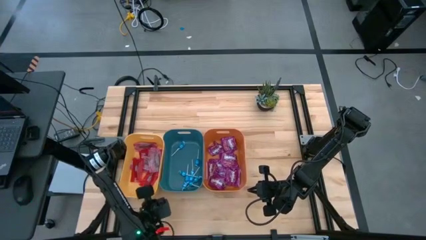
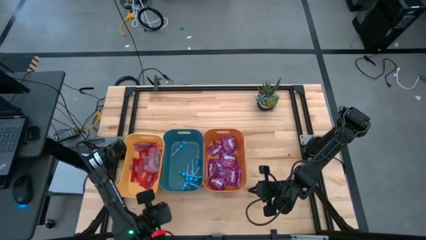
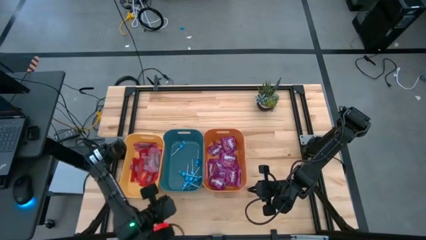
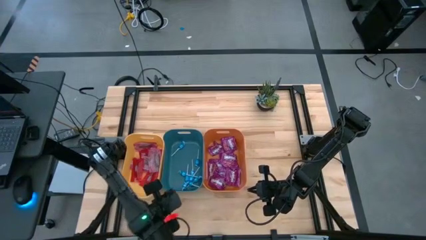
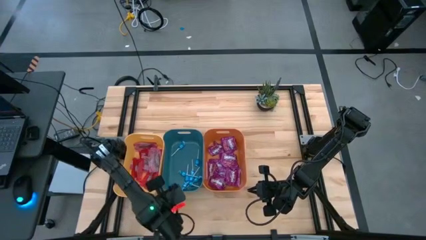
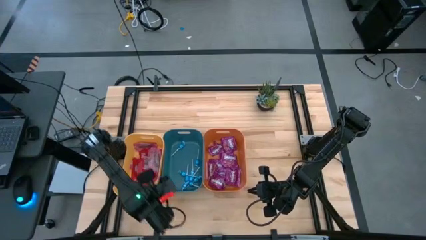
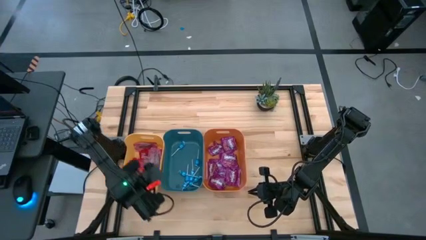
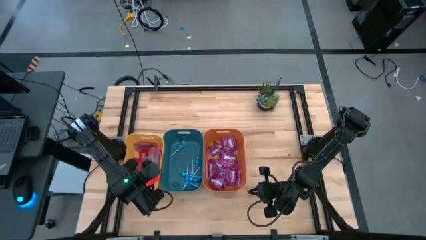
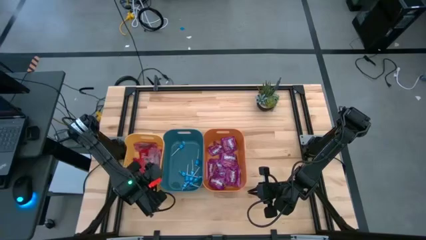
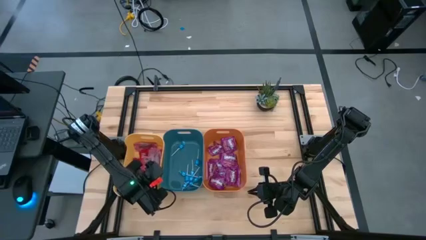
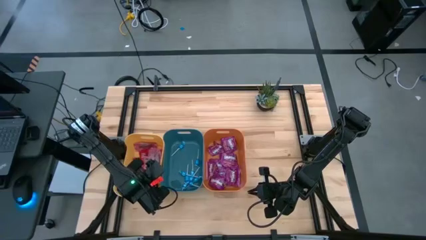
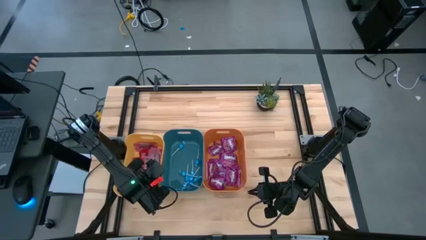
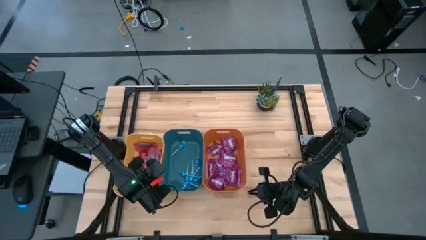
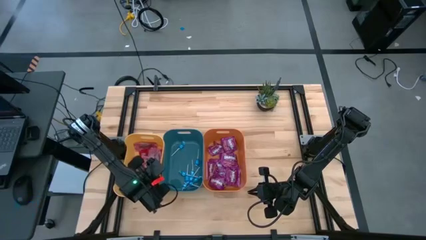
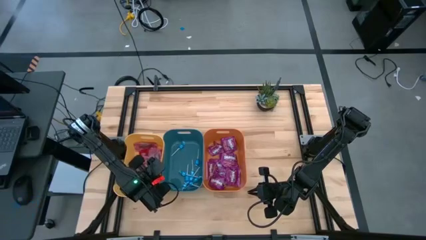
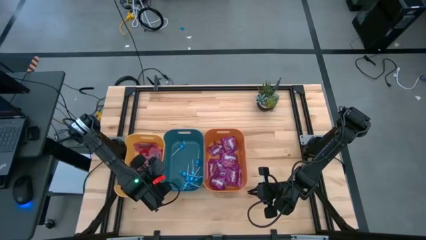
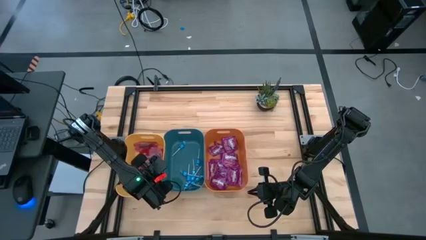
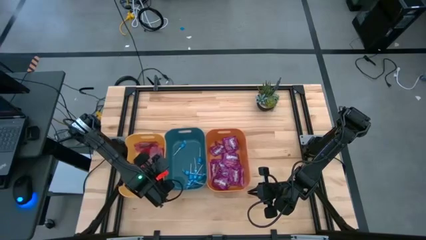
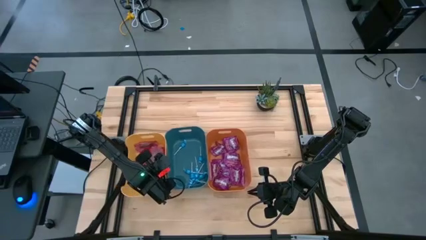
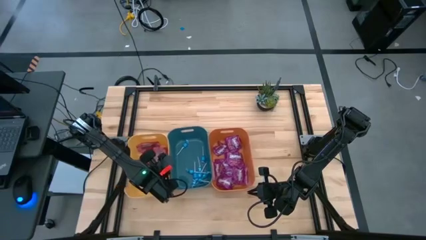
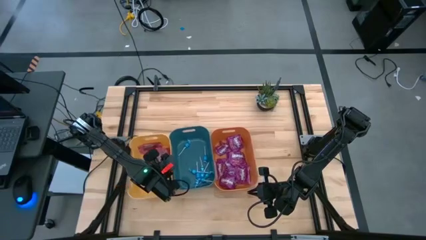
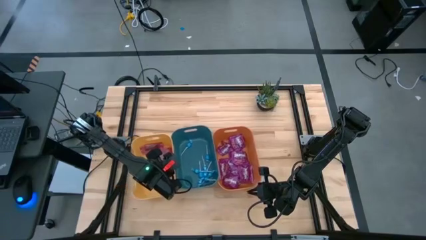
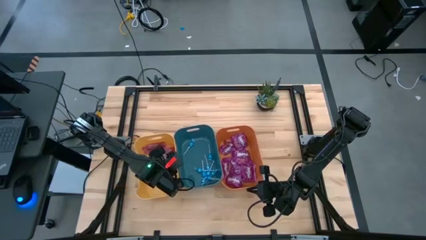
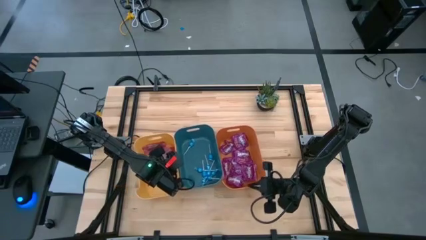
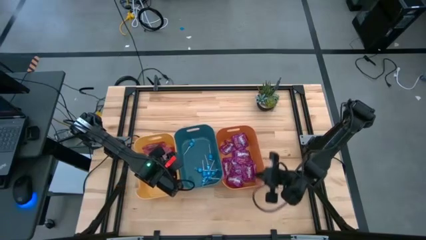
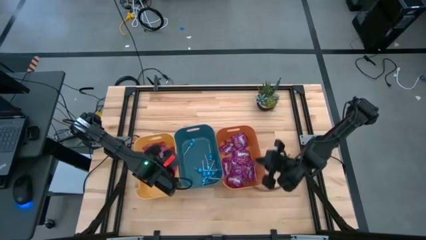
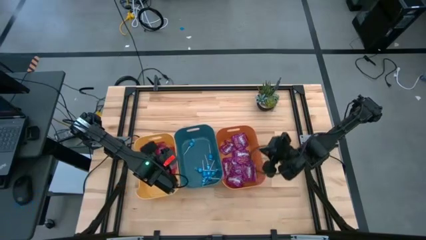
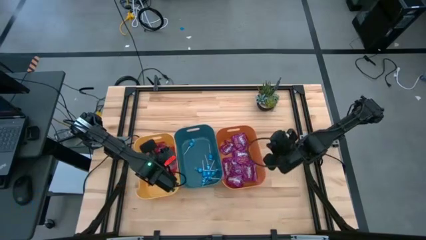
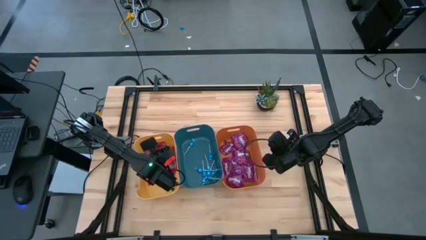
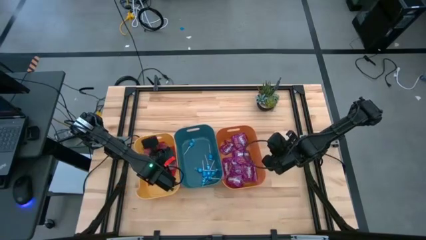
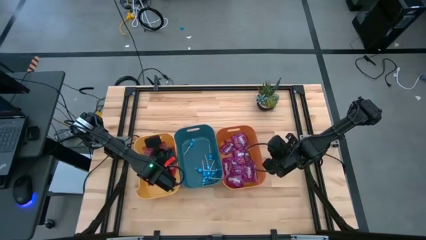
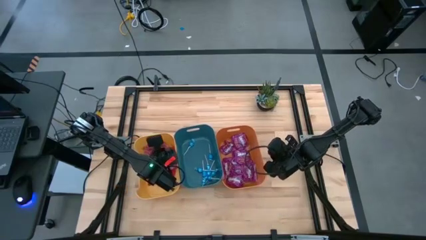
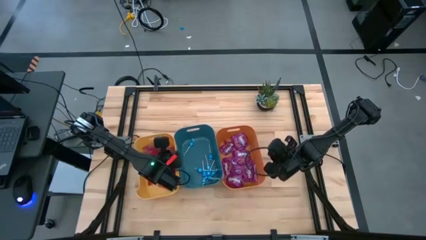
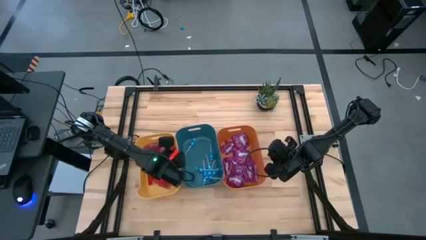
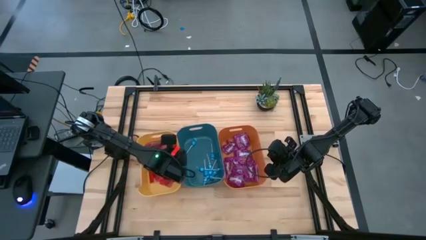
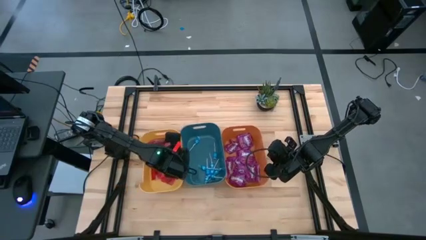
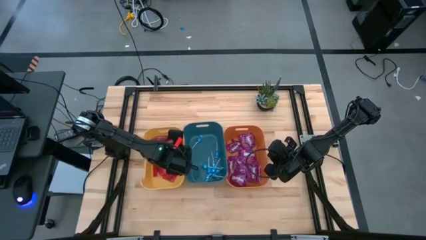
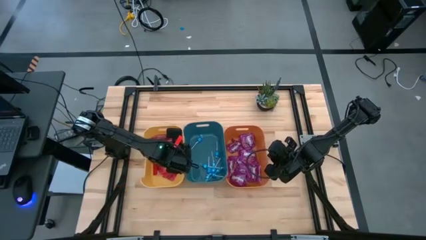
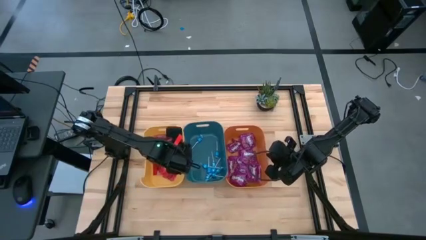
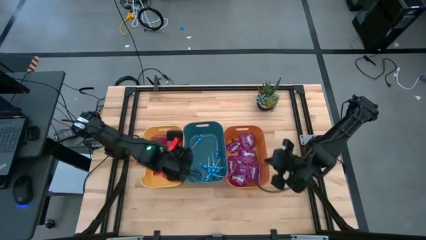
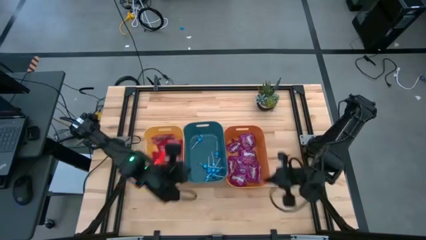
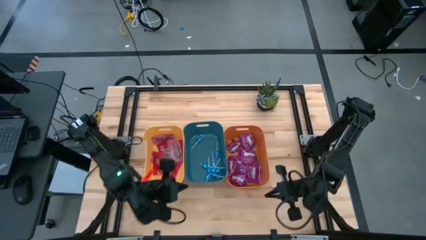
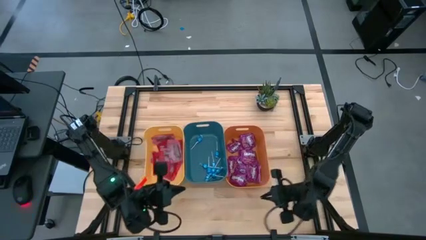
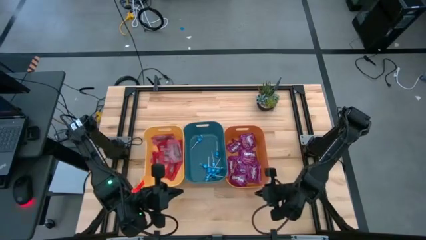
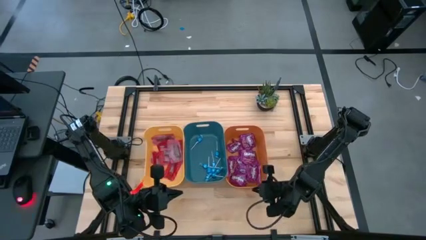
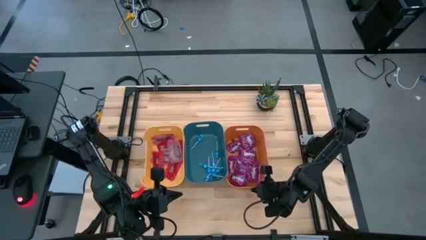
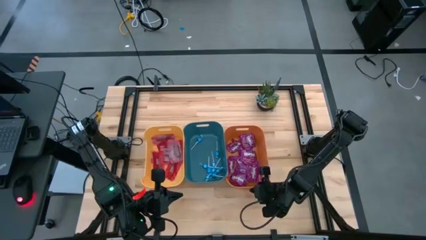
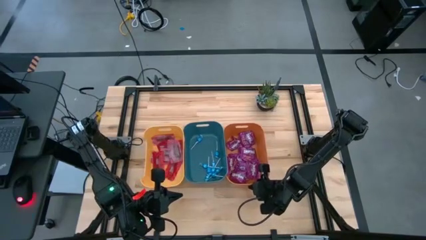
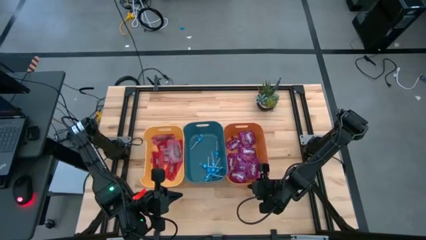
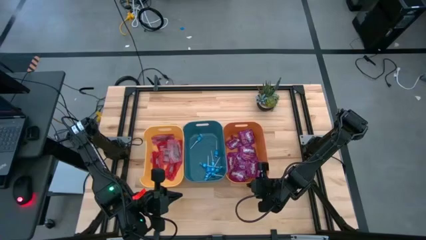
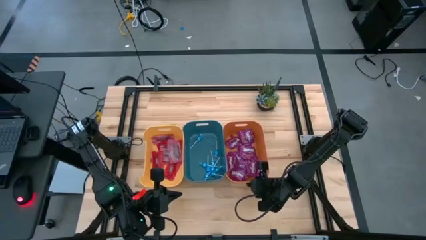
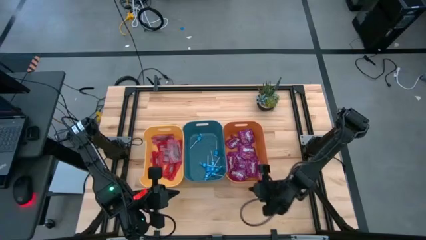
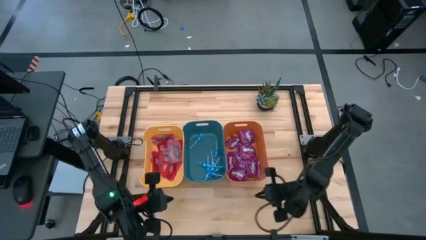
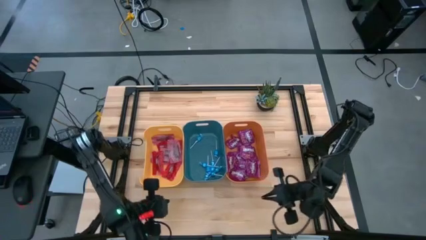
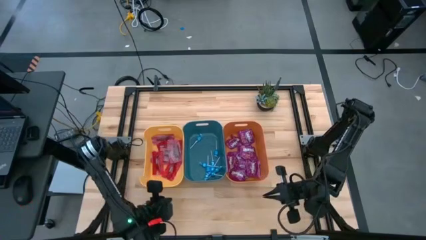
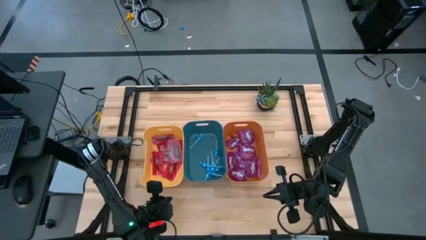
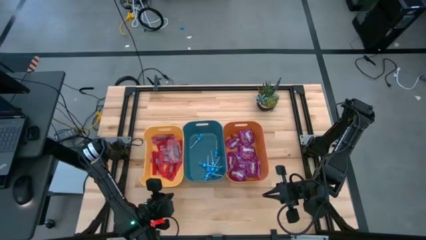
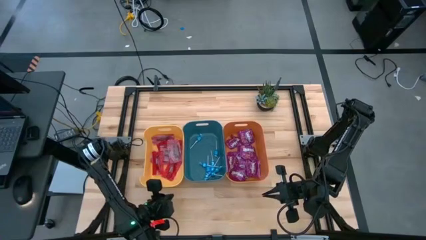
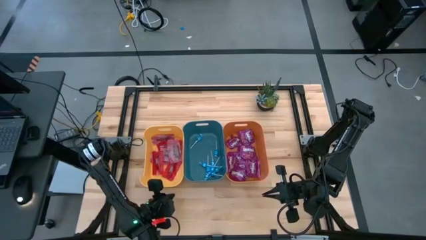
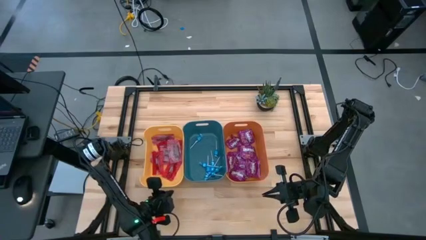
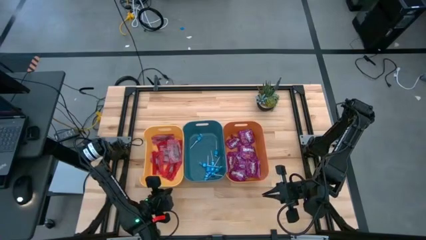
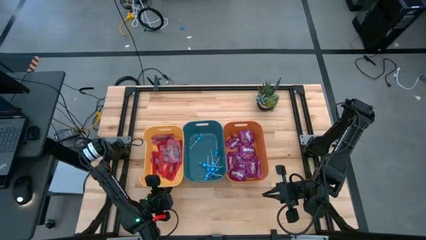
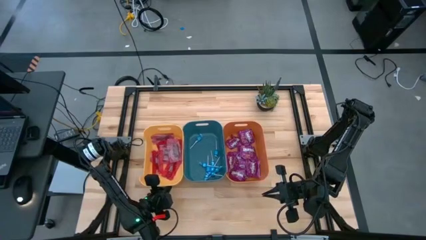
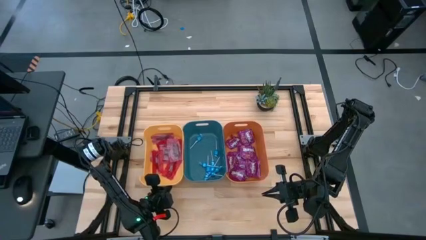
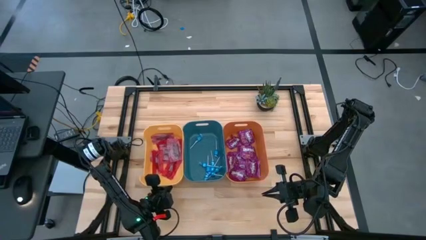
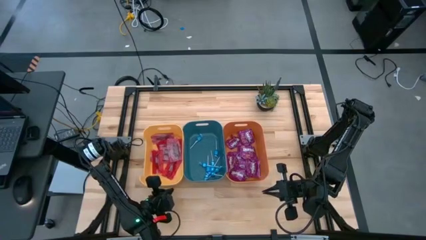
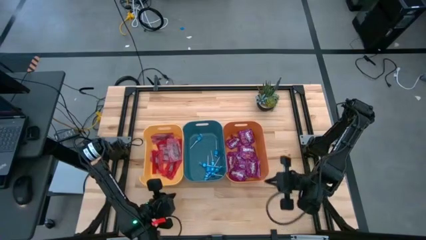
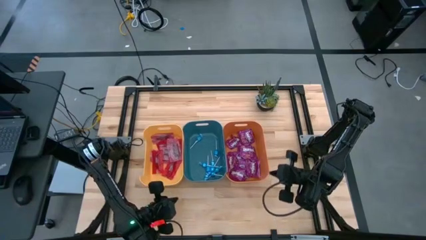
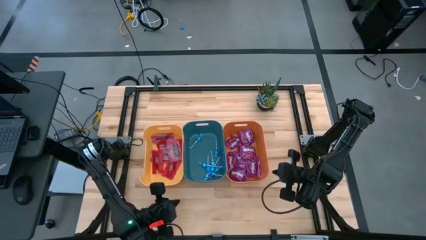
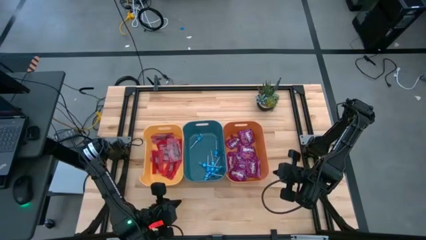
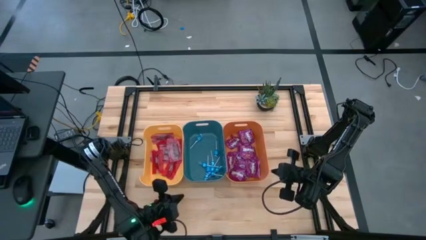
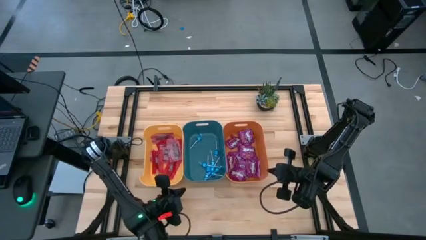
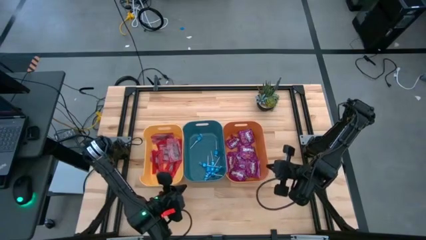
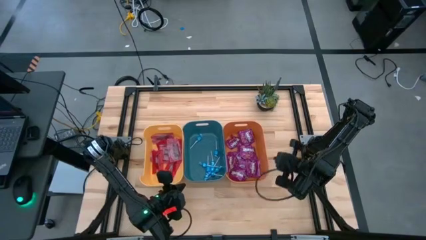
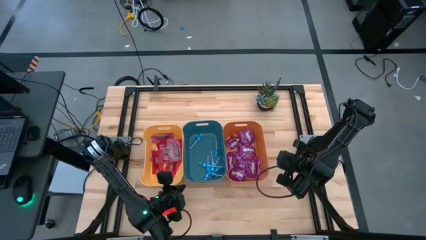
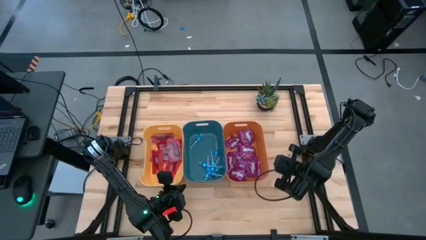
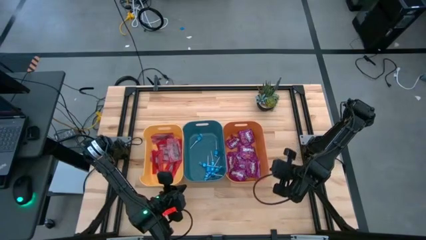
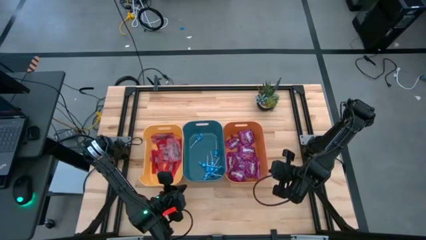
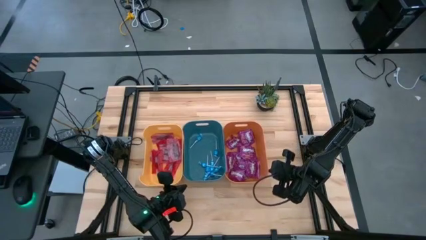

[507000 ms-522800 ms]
Task: Sort candy
Adjust the colored bins
